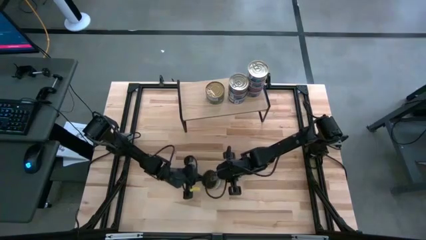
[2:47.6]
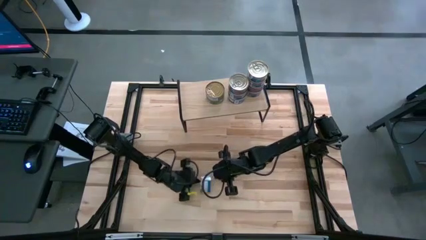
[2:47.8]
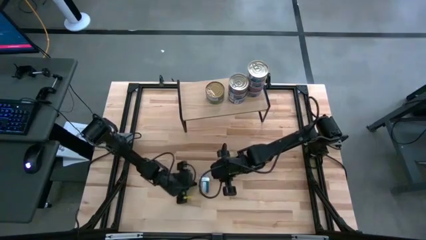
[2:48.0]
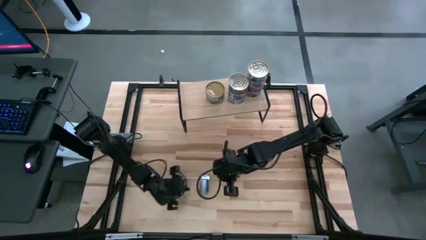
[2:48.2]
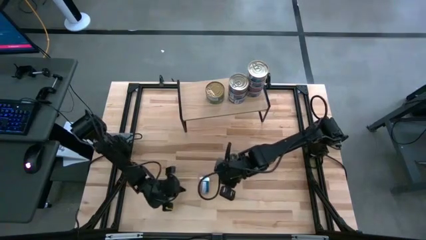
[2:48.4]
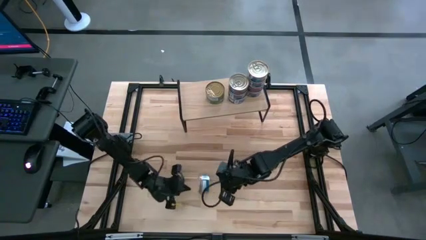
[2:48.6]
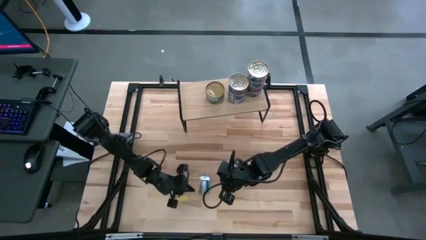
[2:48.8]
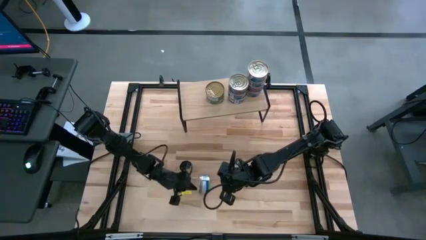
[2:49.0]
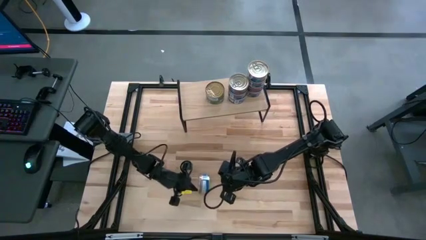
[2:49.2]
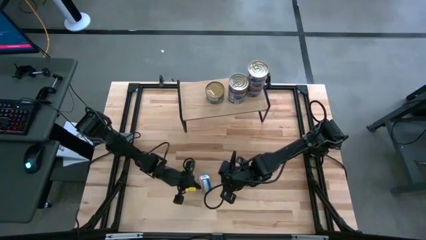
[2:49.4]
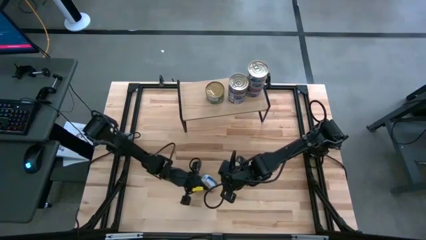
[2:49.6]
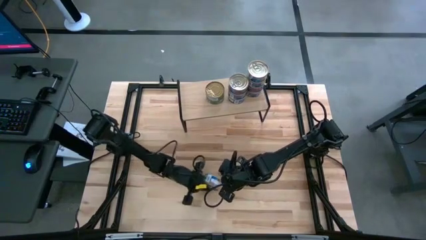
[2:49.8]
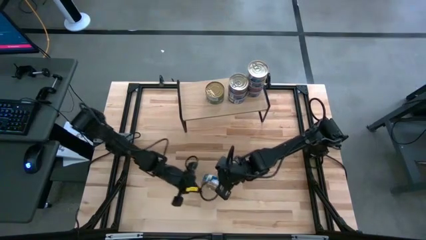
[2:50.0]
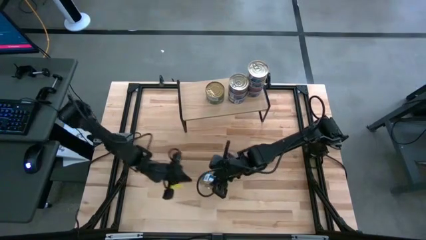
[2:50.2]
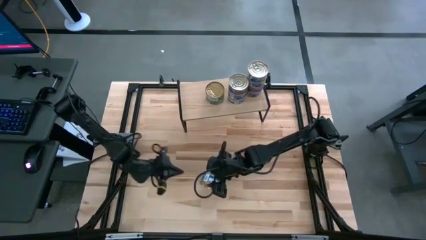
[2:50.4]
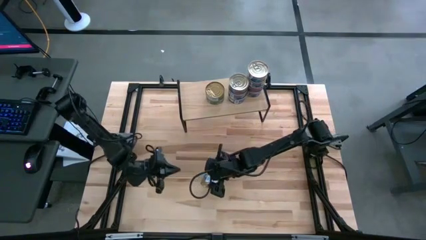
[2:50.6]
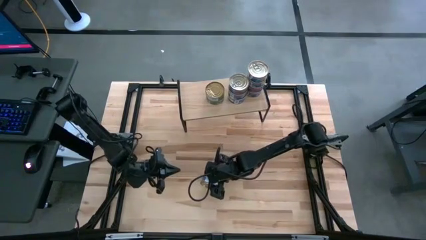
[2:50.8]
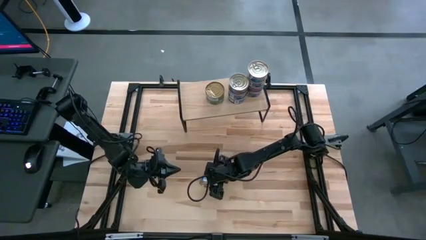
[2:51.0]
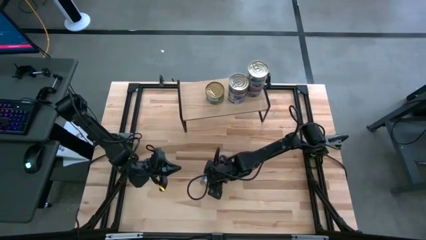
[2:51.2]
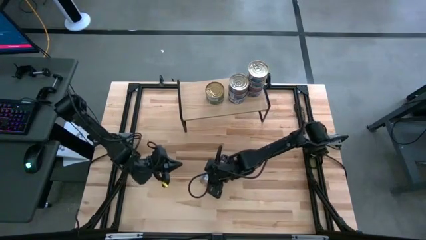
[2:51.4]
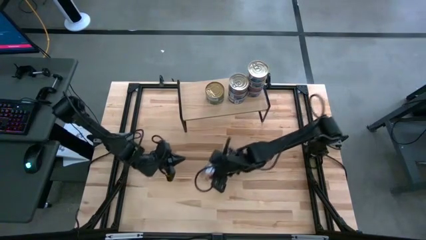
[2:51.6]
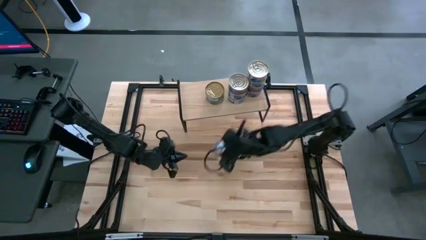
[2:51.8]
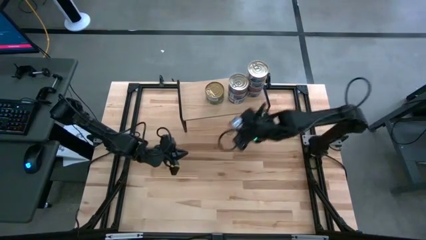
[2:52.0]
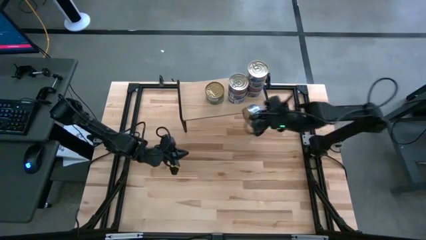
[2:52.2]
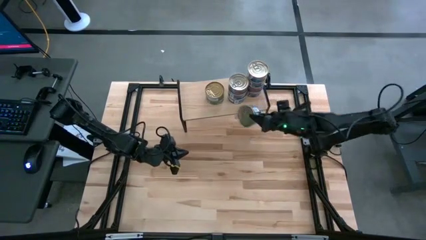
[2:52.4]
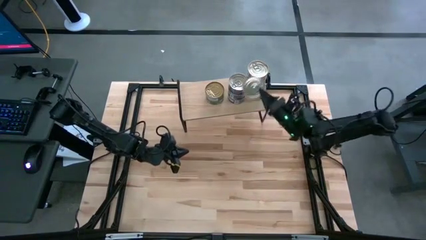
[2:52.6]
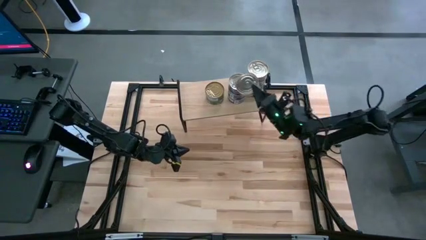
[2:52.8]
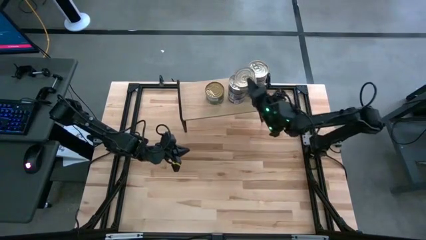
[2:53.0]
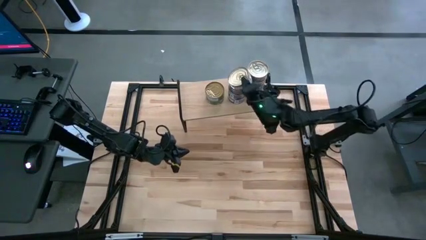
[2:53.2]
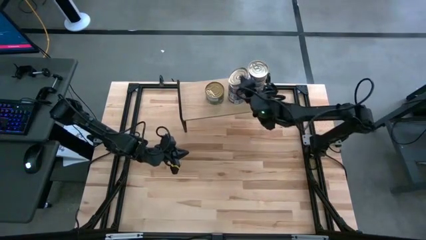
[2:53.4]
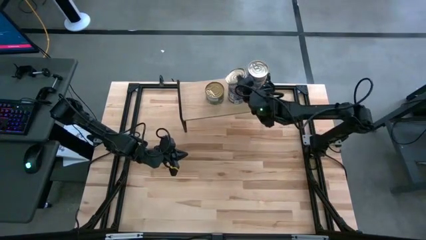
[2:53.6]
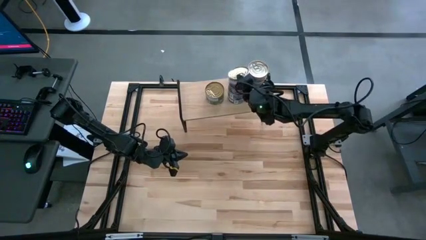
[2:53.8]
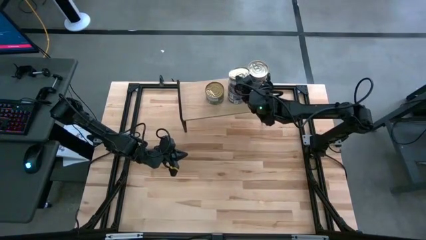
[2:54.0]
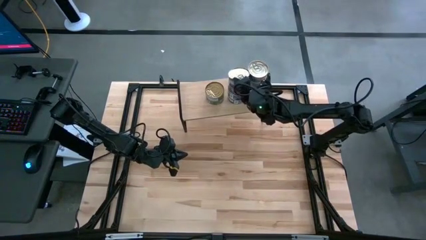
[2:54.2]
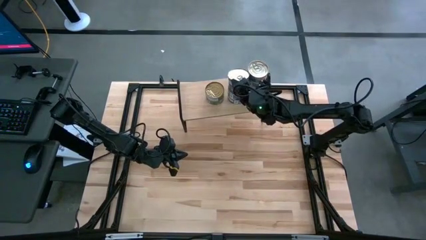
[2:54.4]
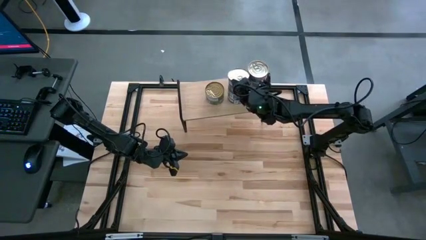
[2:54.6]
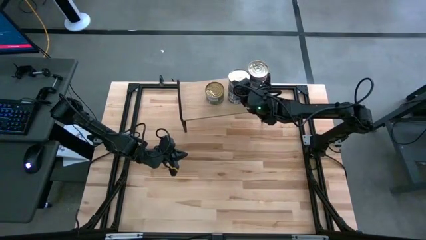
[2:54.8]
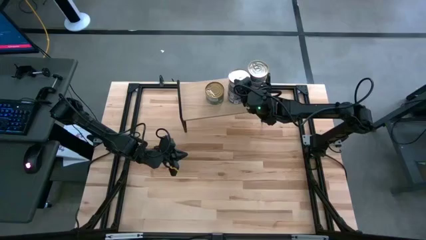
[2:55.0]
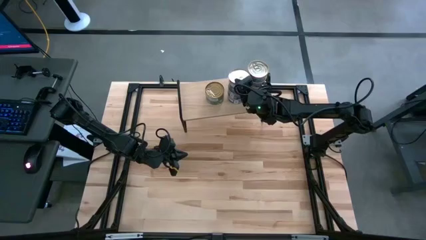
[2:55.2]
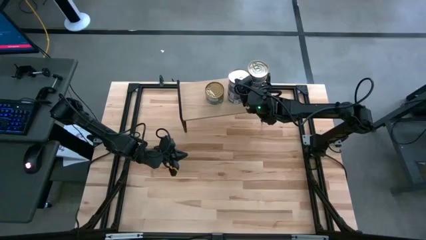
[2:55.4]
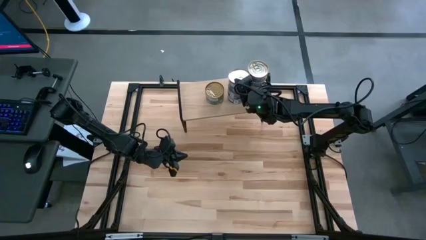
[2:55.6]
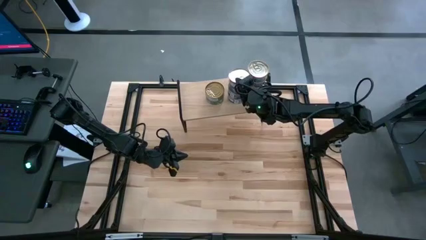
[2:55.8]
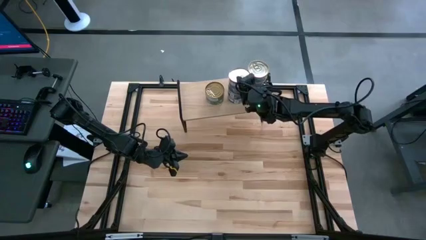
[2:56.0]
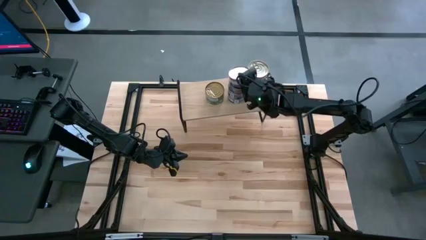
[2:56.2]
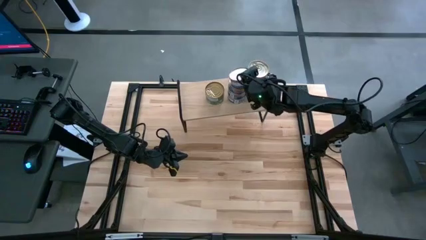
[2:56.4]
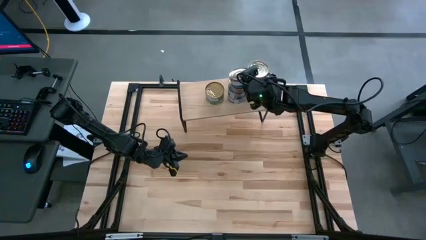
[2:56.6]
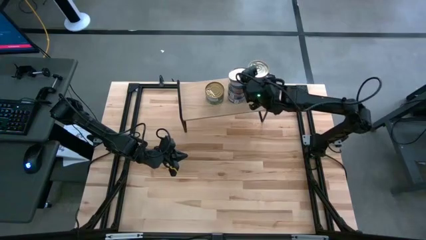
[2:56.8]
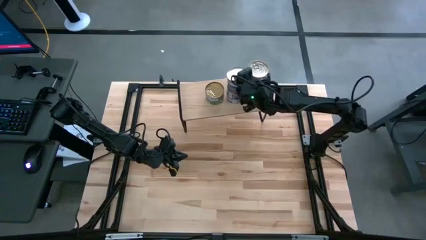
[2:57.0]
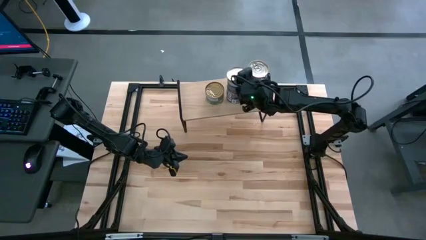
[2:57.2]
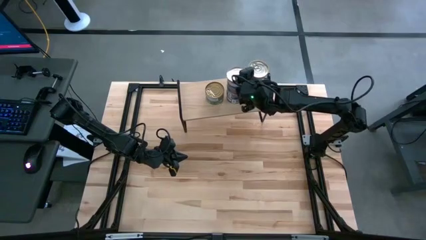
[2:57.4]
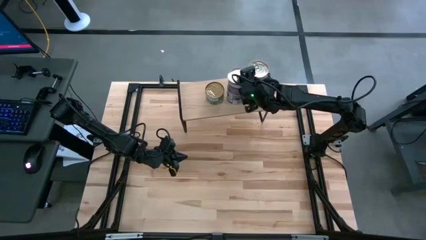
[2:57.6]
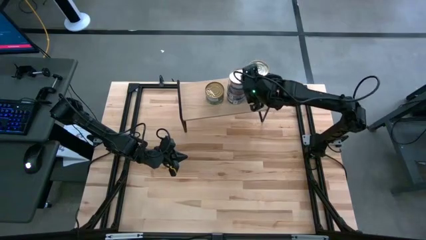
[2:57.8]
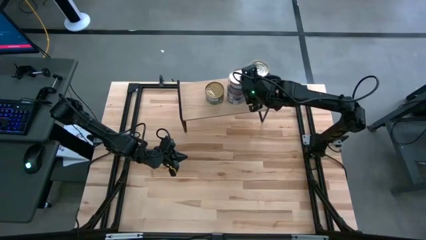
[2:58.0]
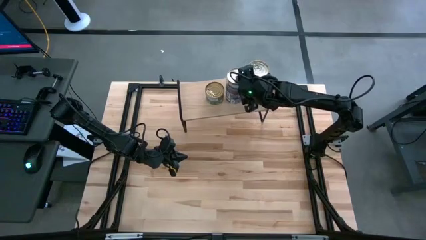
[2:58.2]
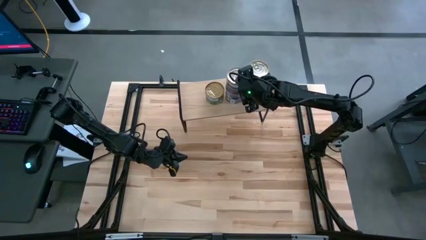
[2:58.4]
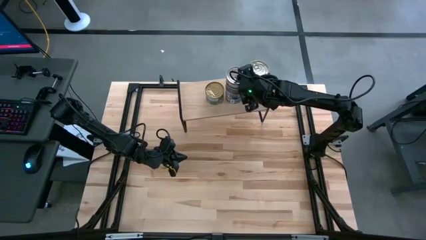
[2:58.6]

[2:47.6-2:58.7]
Task: Stack canned seafood by type on shelf
Stack the blue tuna can on top of the other stacked blue tuna cans on the shelf

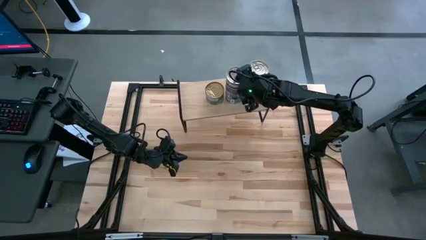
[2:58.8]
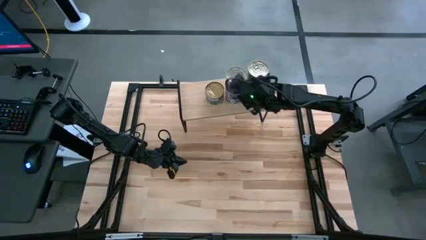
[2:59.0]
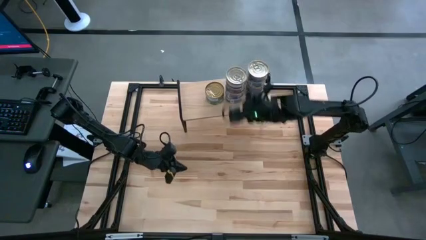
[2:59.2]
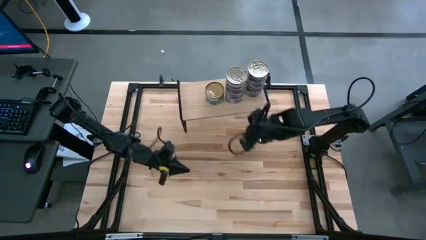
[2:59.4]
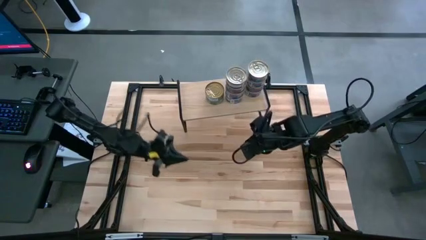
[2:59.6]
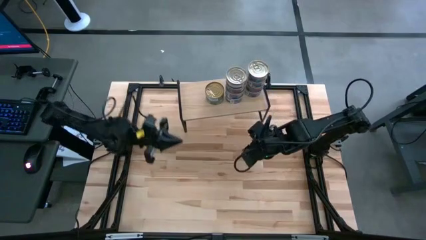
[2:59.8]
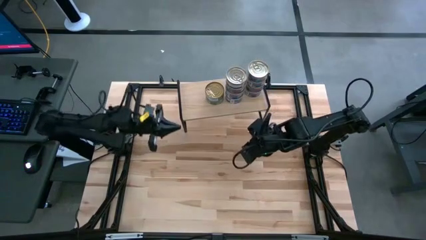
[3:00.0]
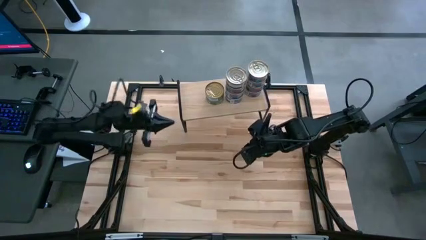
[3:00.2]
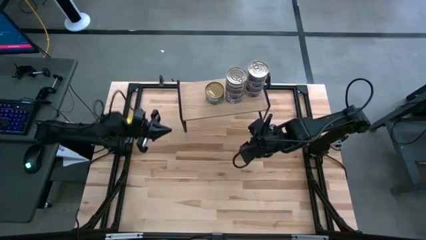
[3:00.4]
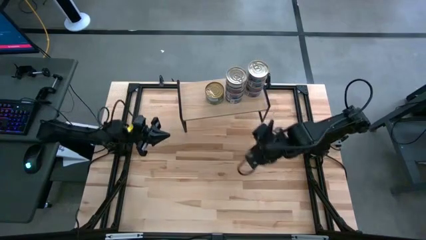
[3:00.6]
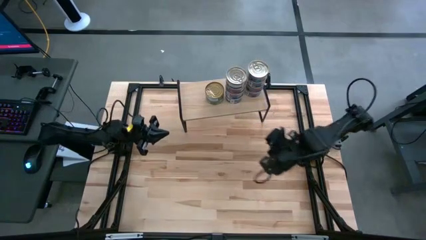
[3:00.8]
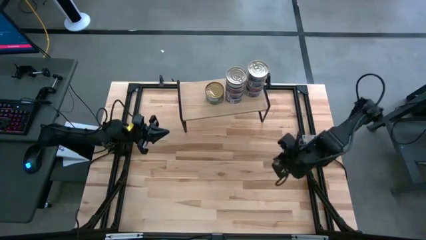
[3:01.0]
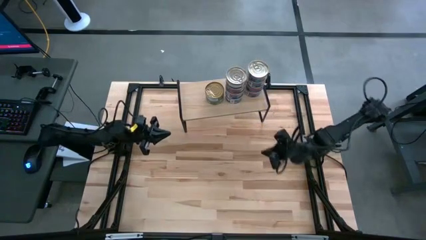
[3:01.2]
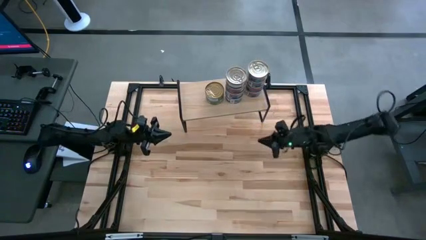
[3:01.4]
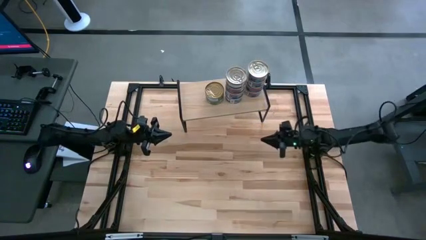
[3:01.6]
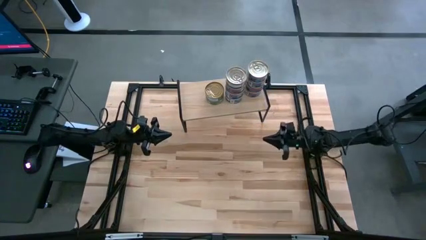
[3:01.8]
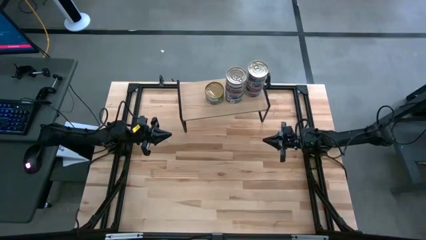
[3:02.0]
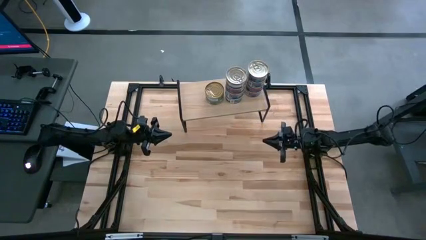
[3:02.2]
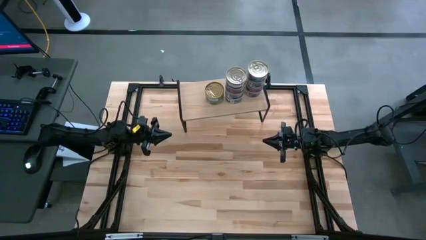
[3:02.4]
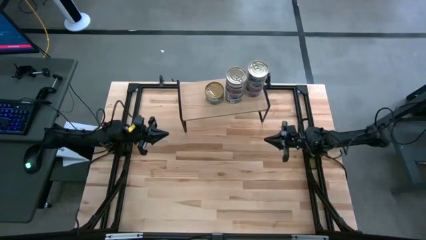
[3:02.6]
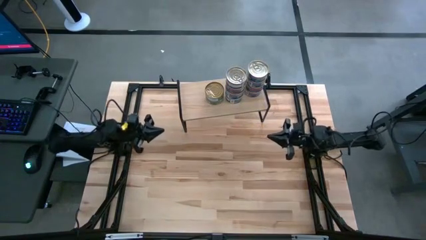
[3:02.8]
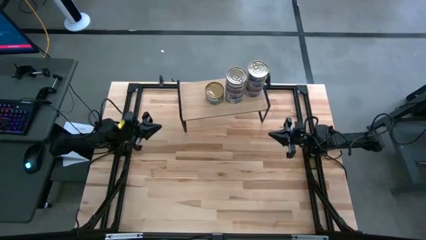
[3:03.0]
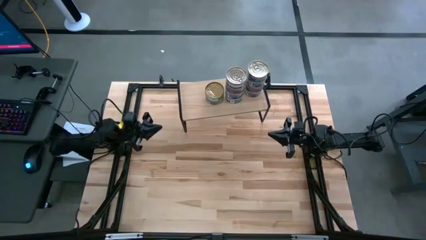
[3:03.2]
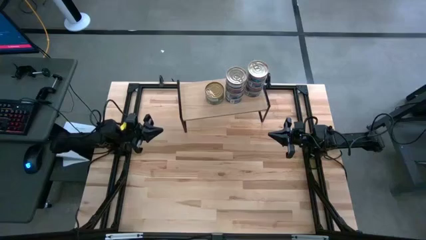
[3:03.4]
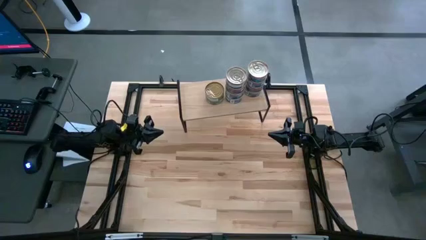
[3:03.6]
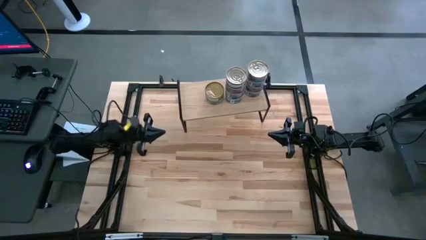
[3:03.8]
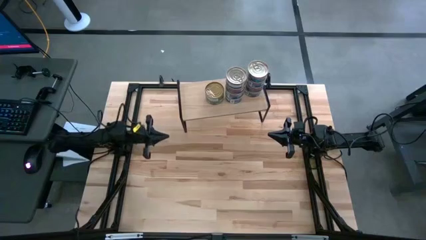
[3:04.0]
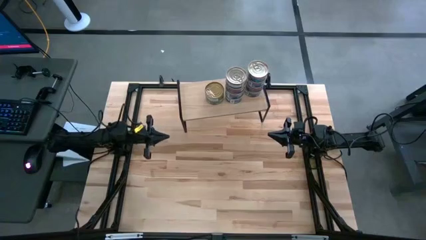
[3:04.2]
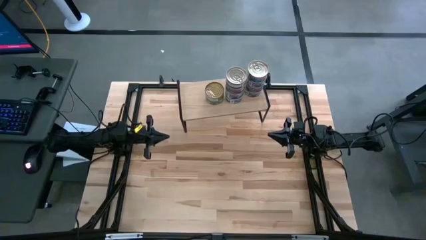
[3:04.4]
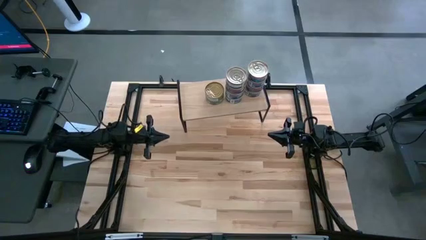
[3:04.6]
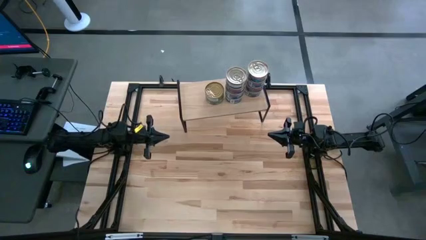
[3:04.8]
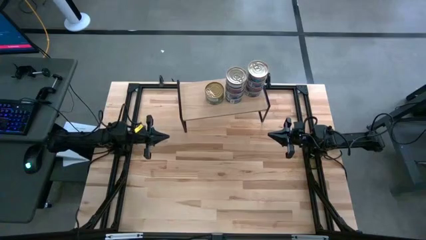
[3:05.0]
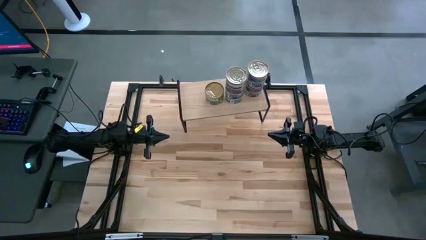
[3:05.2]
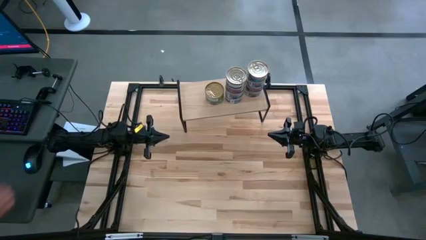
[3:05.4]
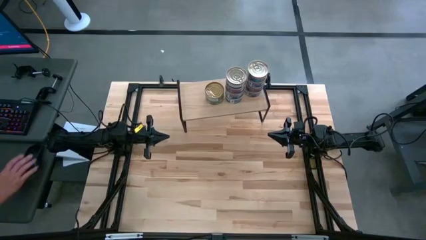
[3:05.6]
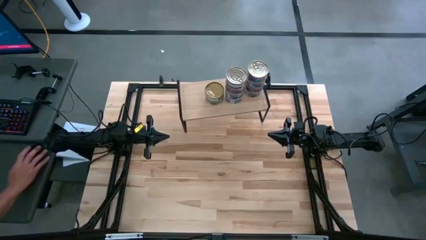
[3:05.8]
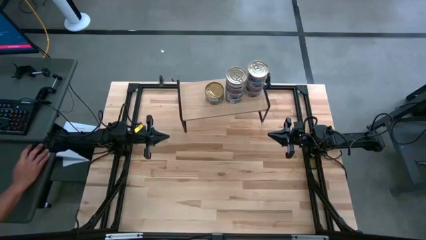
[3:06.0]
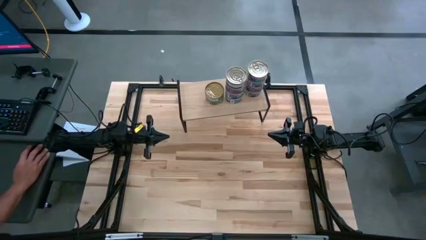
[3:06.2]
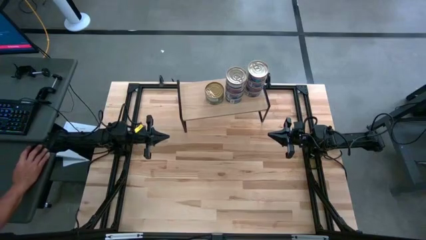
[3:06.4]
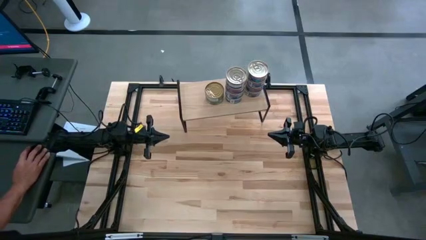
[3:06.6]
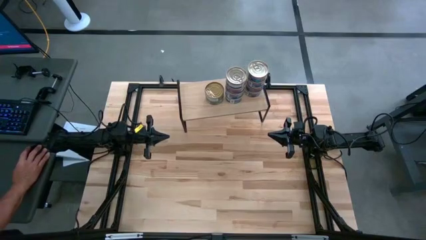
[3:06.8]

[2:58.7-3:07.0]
Return to Home Position
